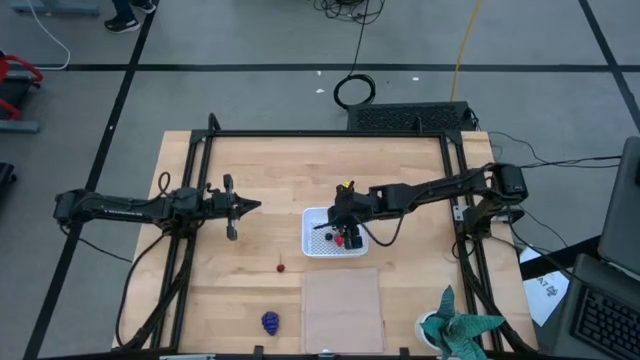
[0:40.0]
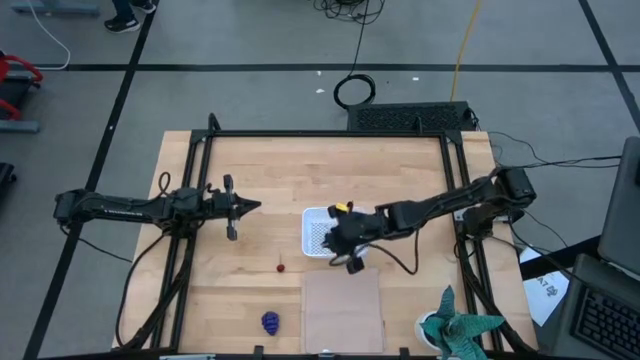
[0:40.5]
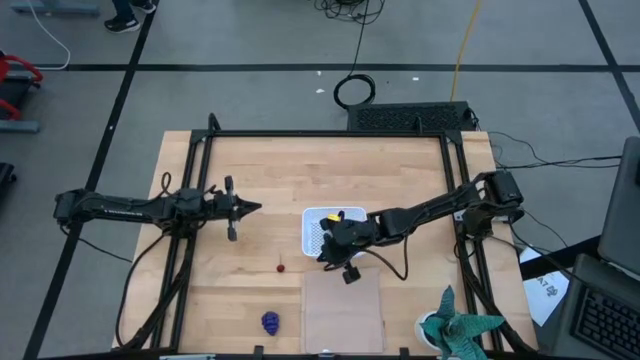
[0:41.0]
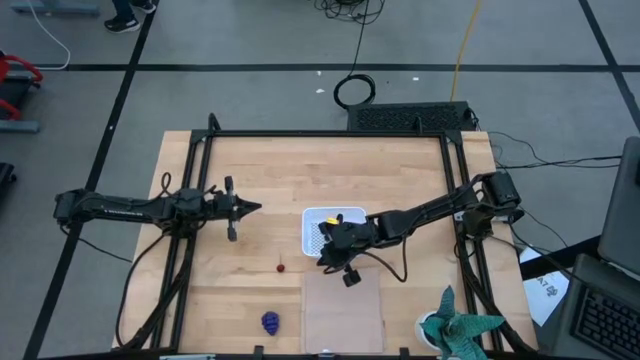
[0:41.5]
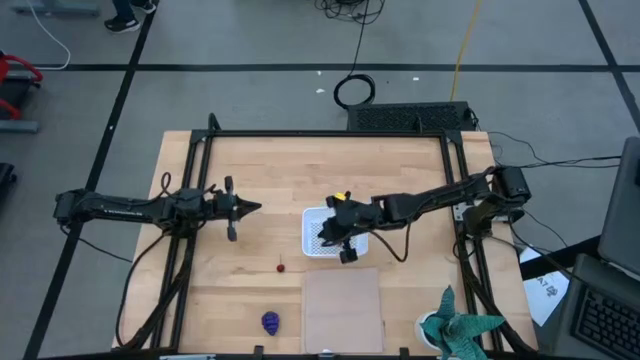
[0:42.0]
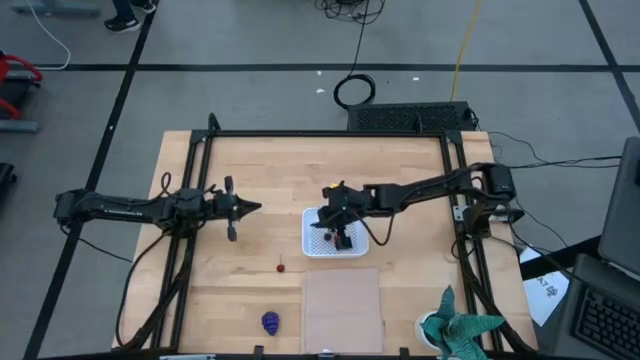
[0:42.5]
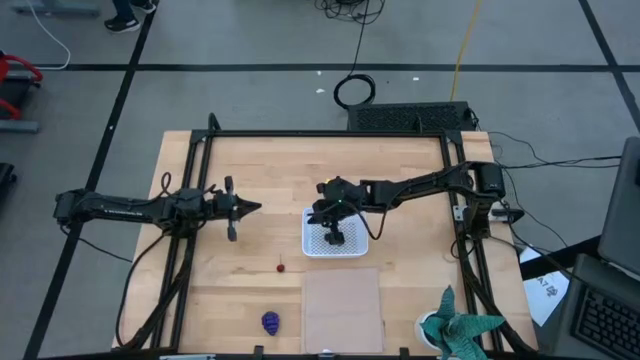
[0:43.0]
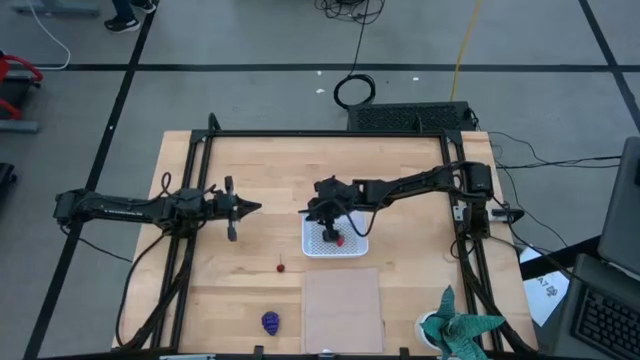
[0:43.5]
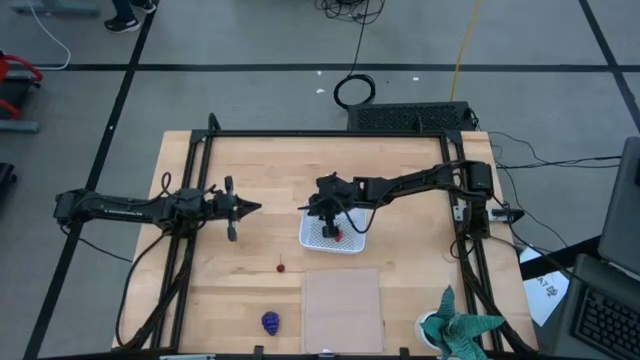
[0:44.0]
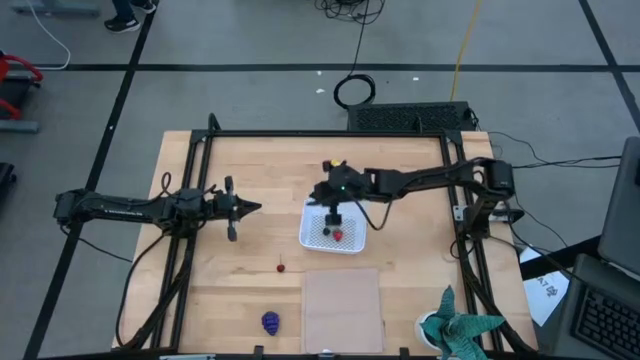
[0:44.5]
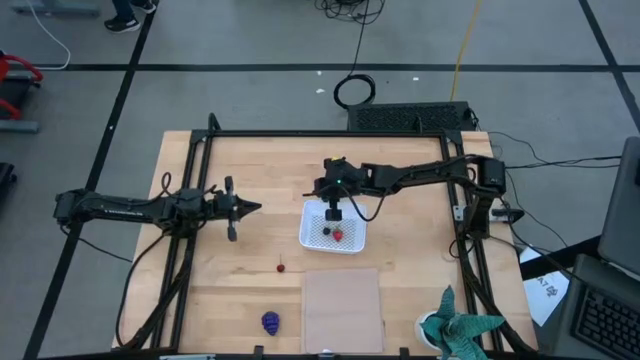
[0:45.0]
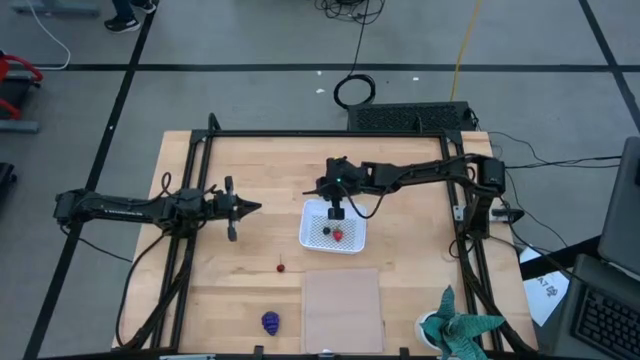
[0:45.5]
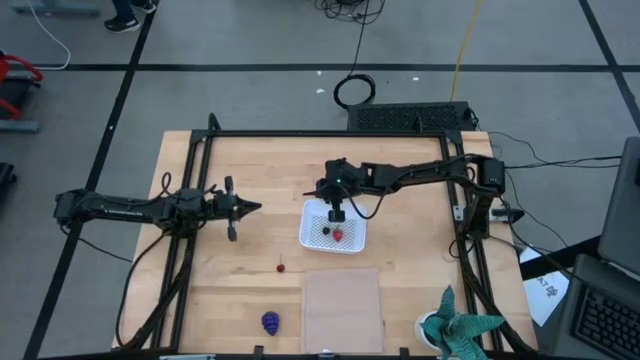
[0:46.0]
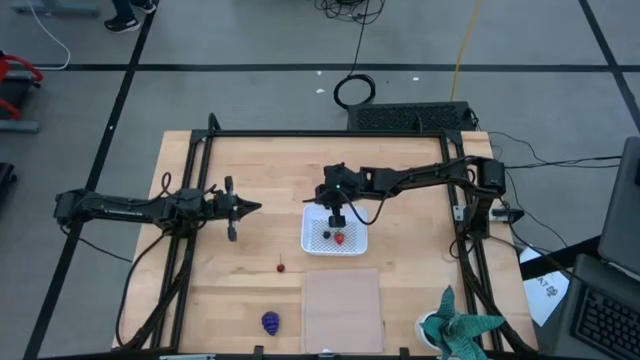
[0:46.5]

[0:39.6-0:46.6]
Task: Pick and placing Produce into tupperware
Adjust the white bin

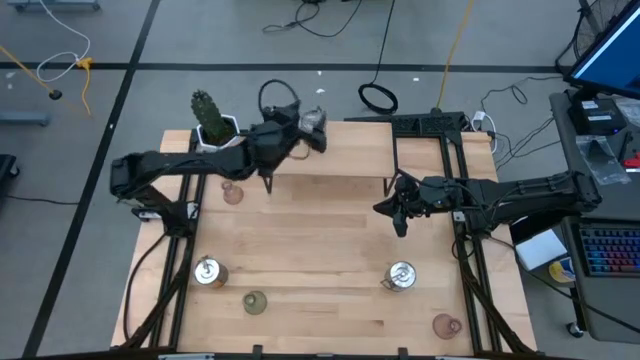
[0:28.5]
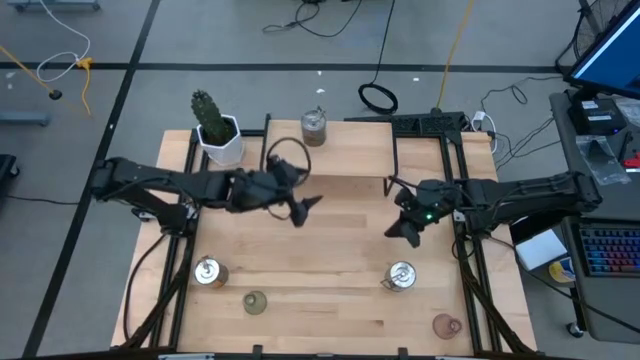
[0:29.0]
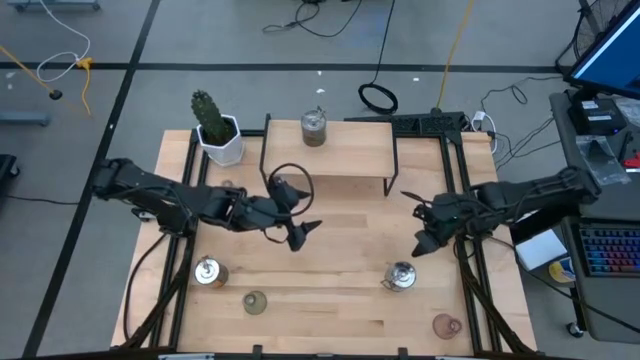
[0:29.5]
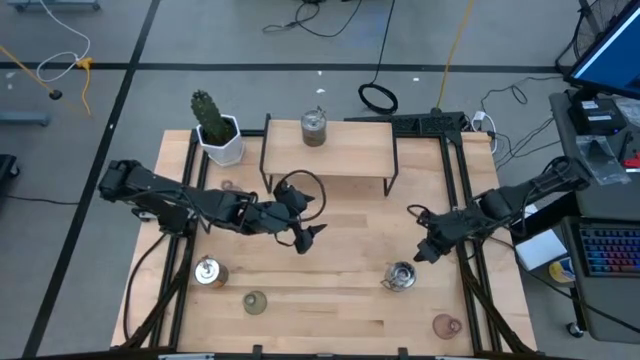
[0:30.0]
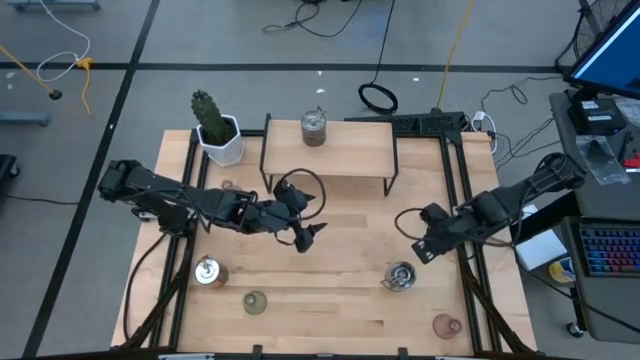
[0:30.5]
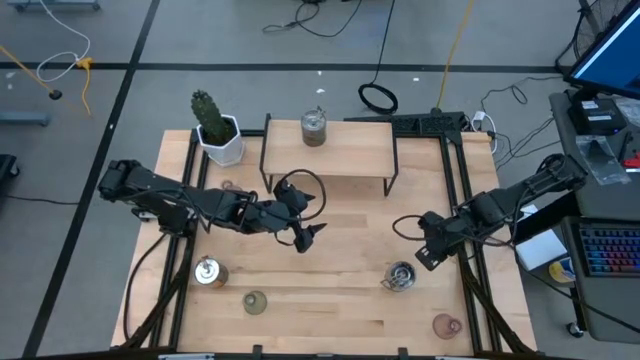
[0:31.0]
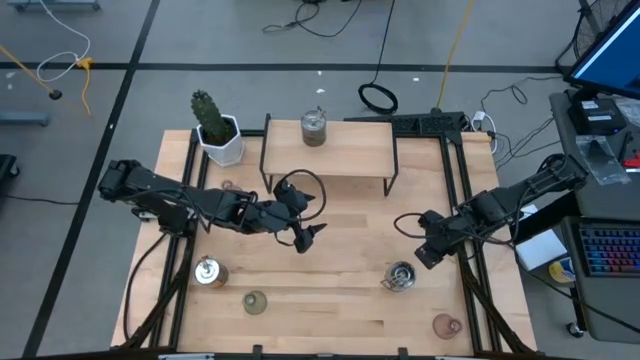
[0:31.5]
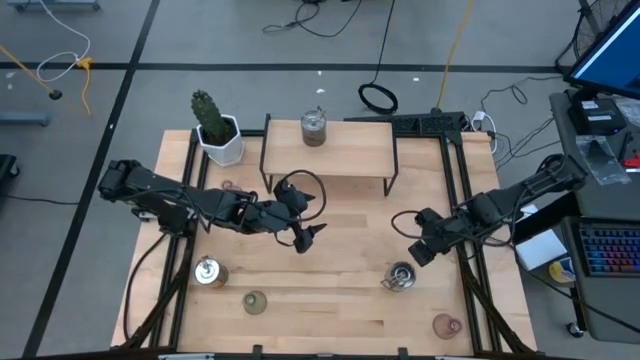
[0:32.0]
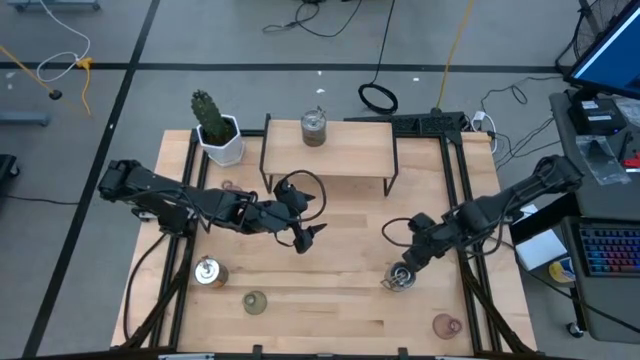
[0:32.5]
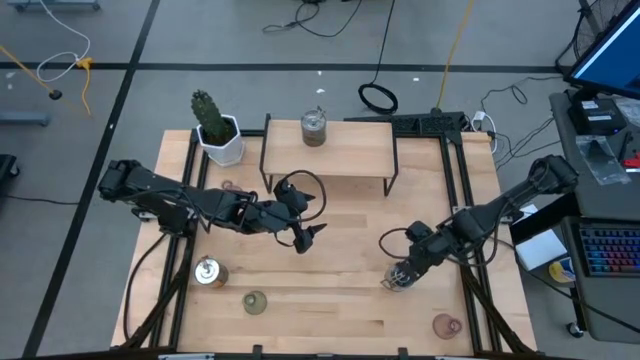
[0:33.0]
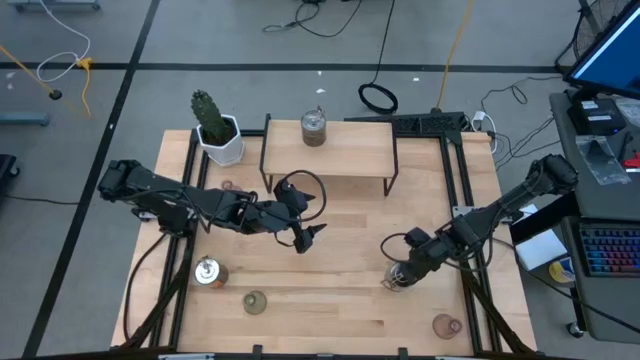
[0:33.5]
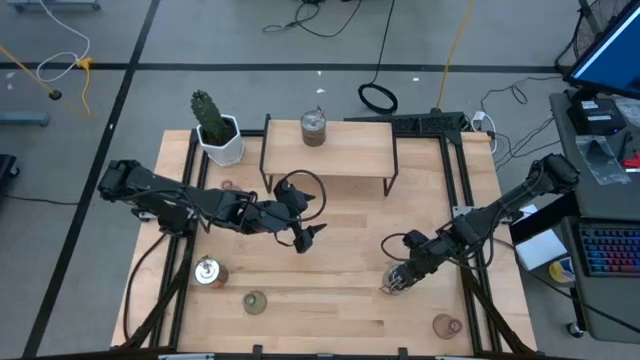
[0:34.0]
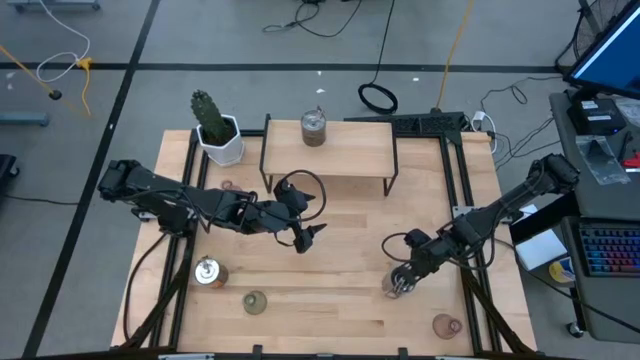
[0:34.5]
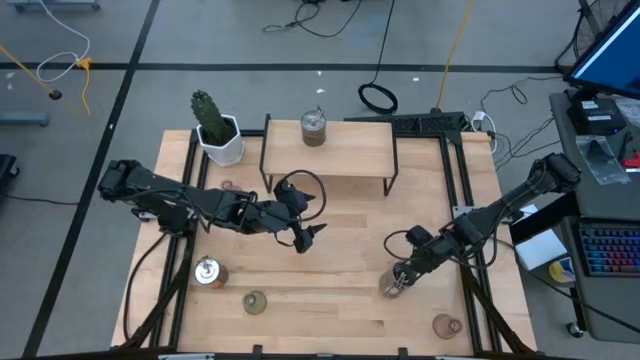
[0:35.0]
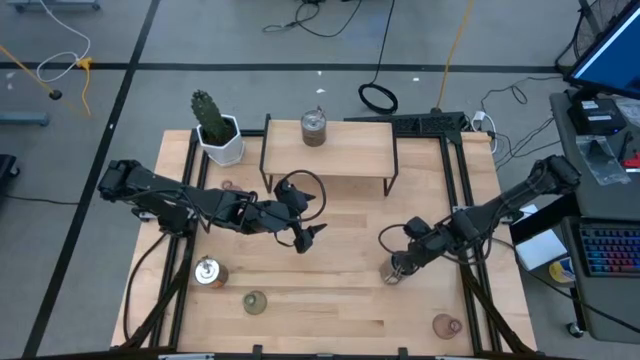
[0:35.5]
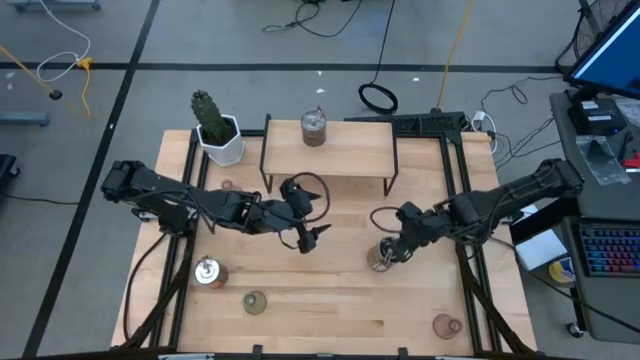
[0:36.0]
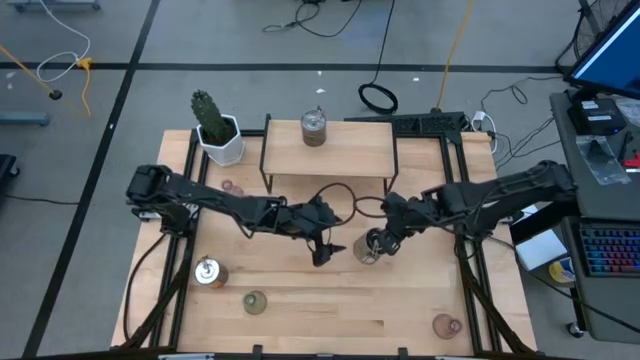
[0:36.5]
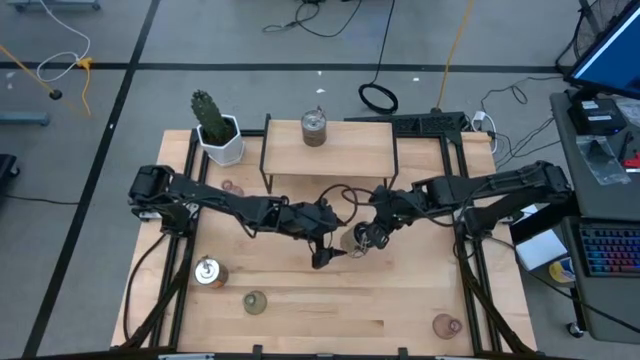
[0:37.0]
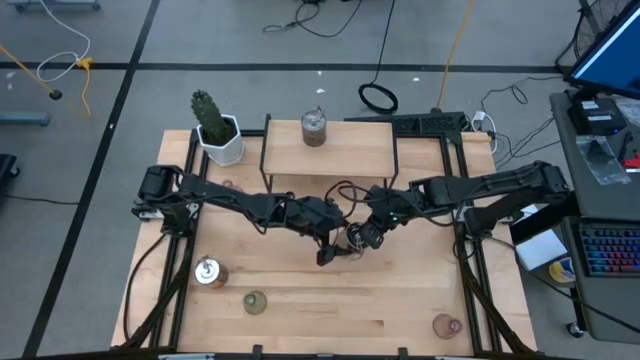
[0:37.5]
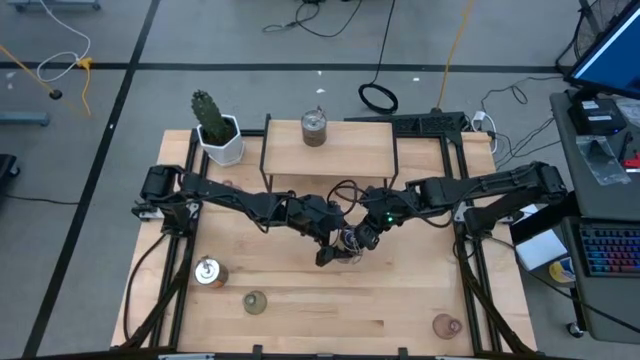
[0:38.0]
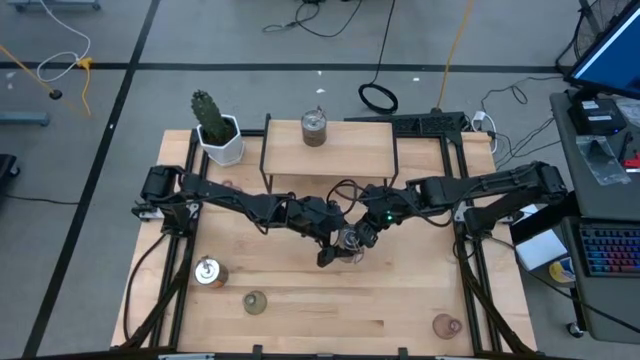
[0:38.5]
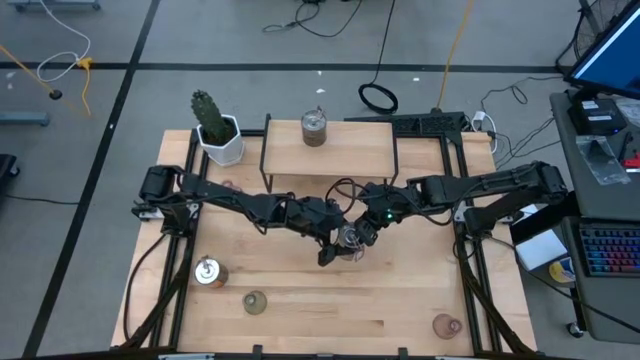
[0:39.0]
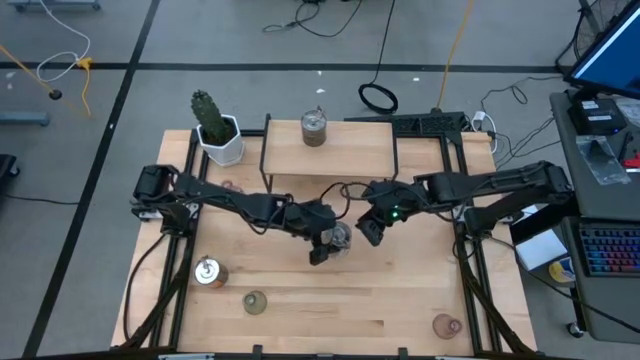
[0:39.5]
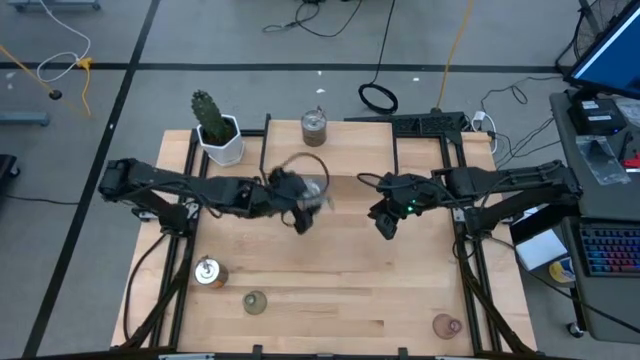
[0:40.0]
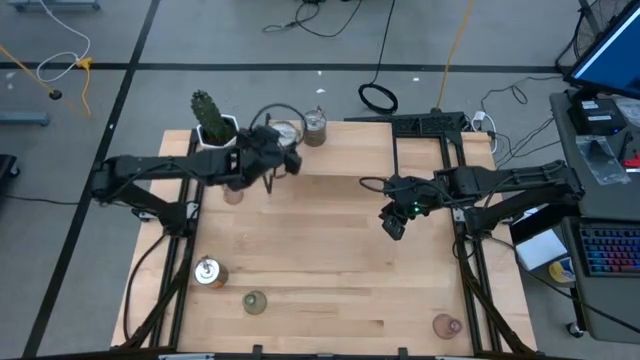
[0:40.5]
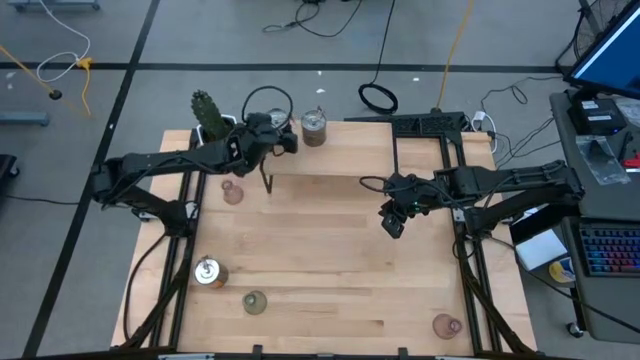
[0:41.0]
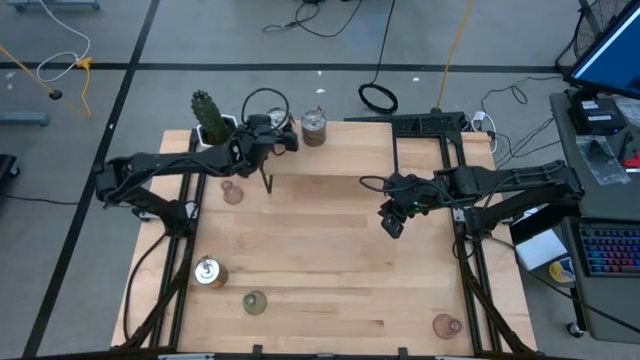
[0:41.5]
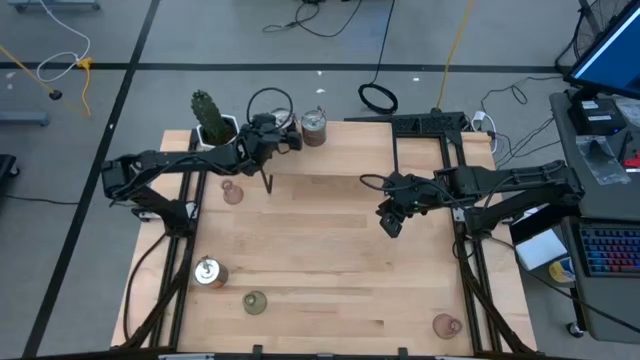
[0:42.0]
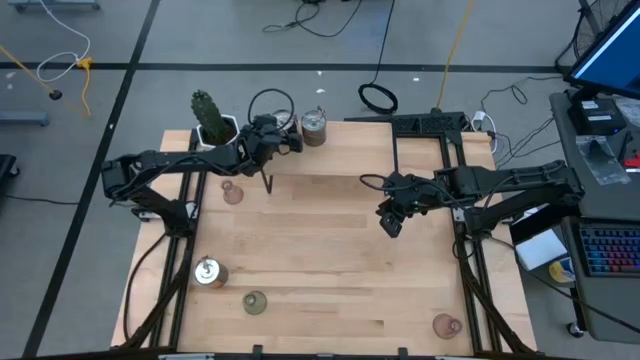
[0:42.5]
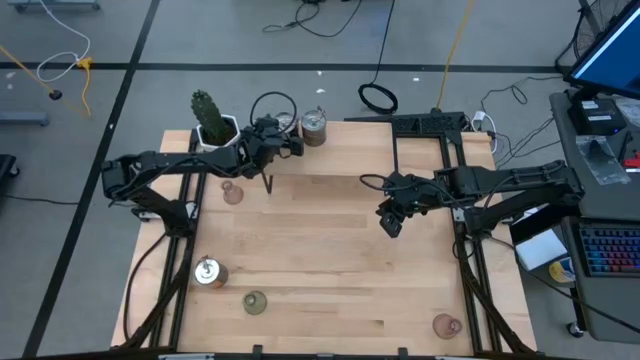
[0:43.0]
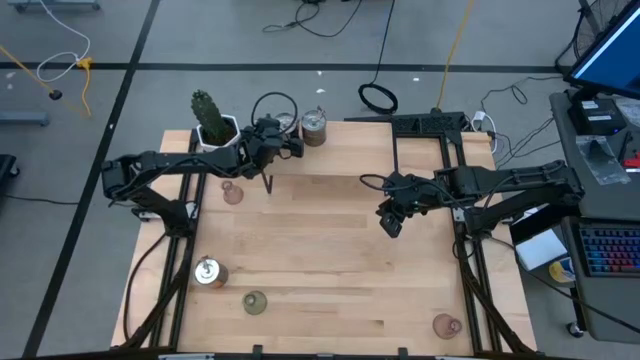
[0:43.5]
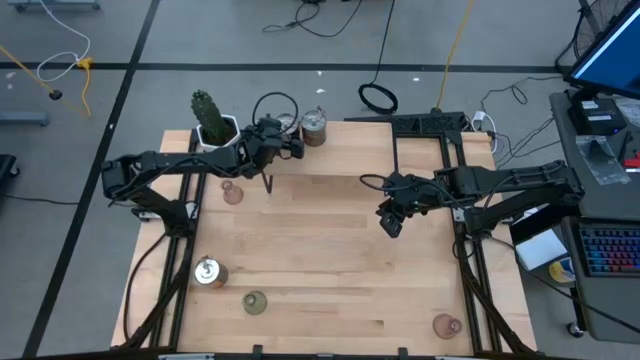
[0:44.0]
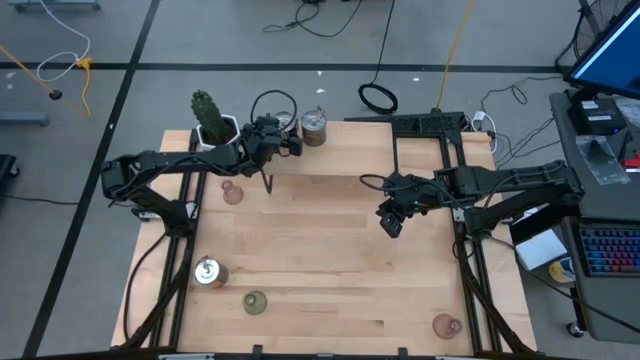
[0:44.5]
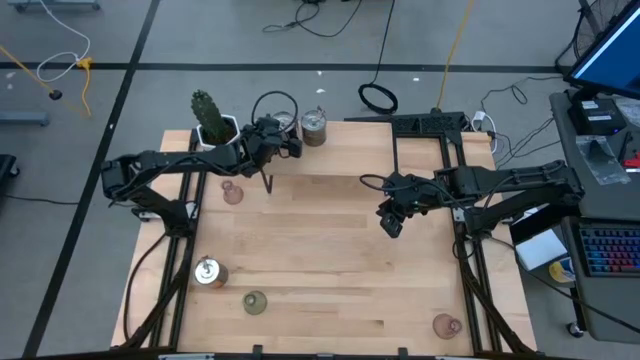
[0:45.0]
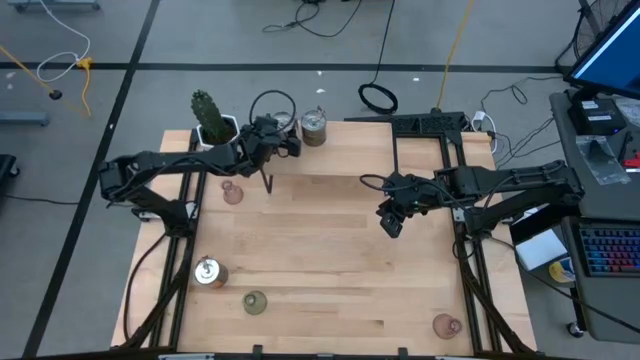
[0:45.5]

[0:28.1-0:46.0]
Task: Pick & Place candle stick holders
Put the right silver scented candle on the shelf
